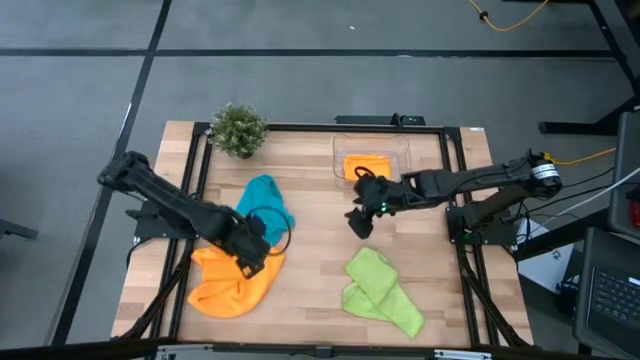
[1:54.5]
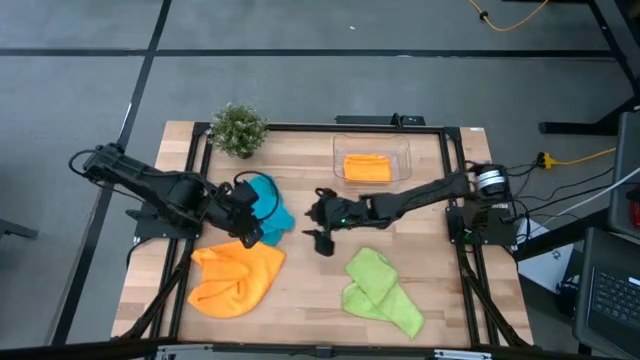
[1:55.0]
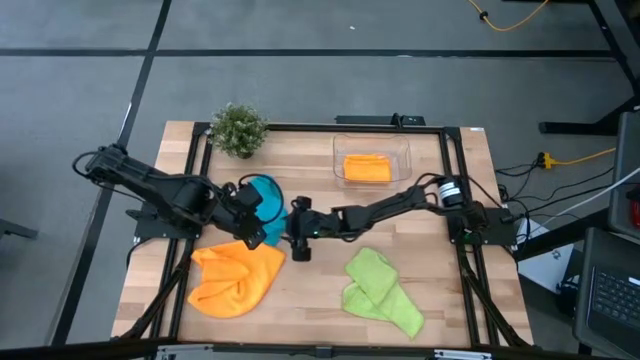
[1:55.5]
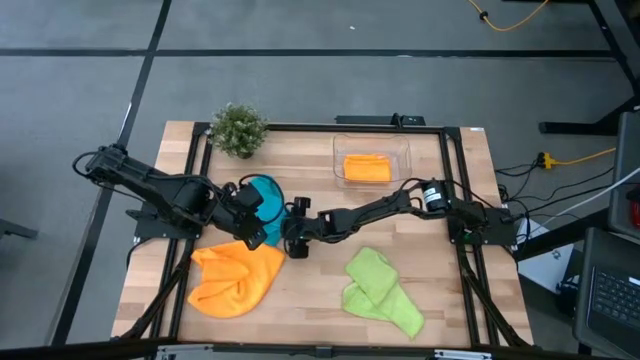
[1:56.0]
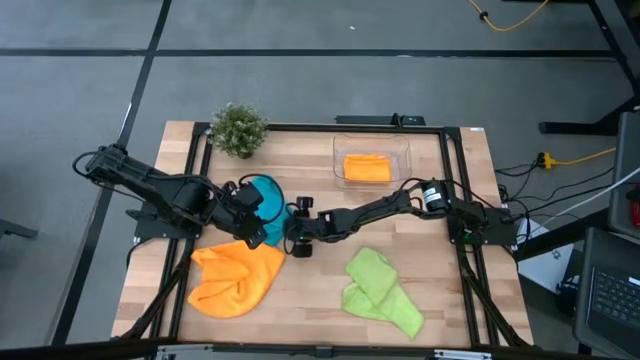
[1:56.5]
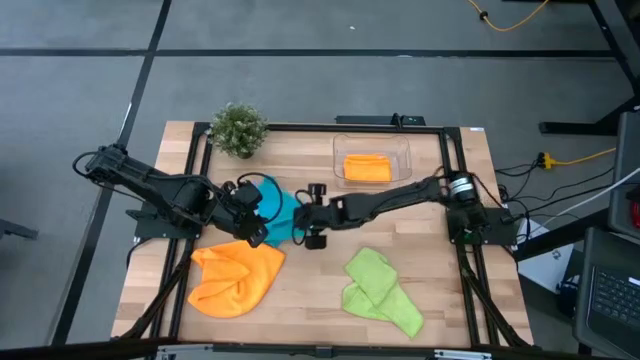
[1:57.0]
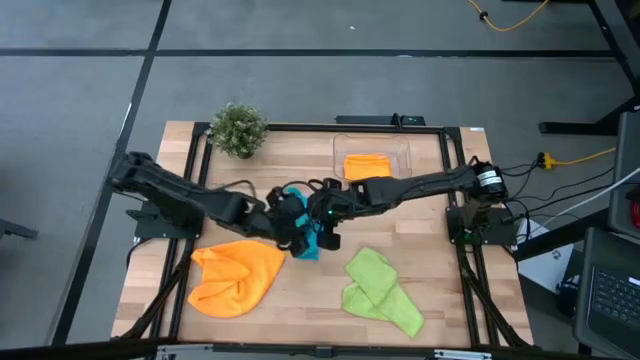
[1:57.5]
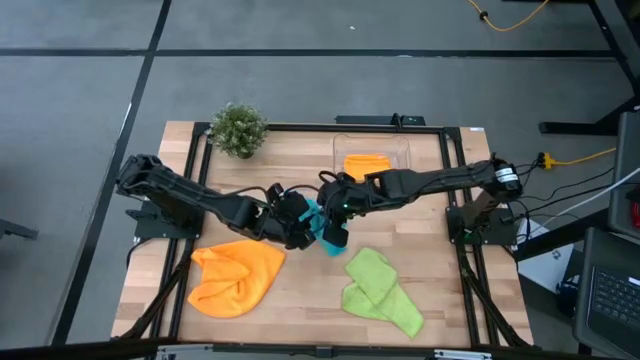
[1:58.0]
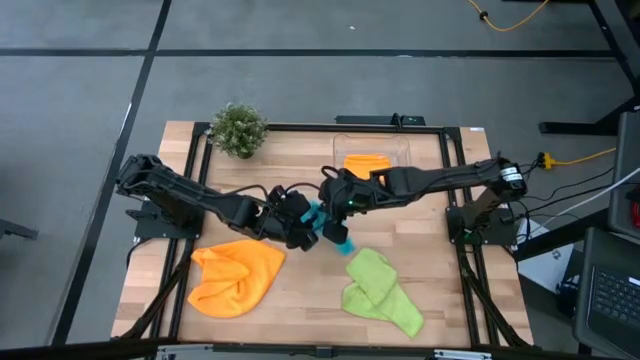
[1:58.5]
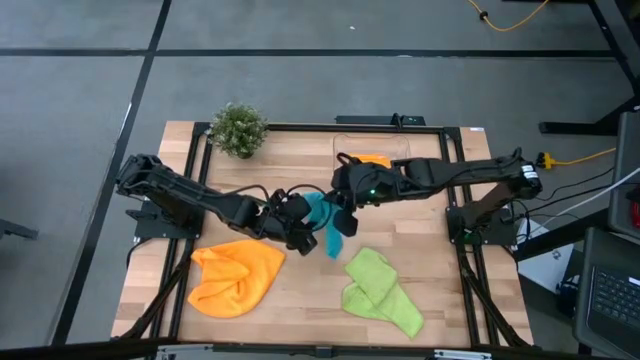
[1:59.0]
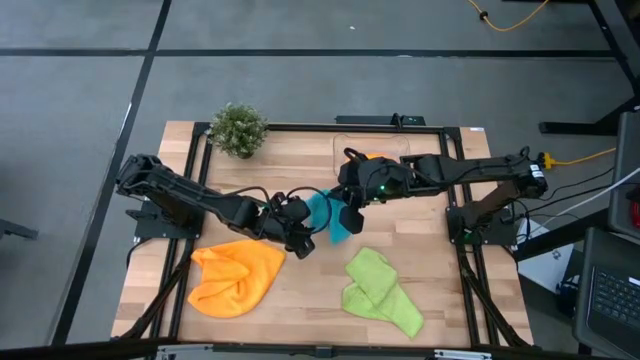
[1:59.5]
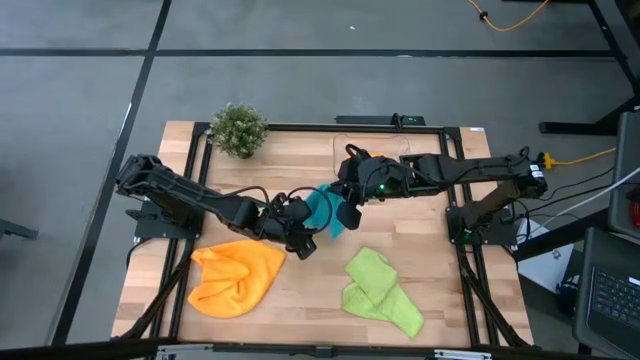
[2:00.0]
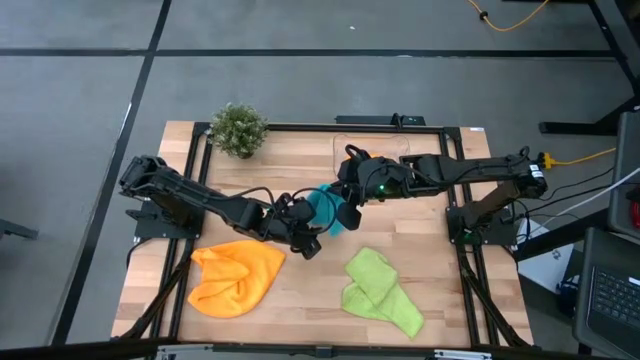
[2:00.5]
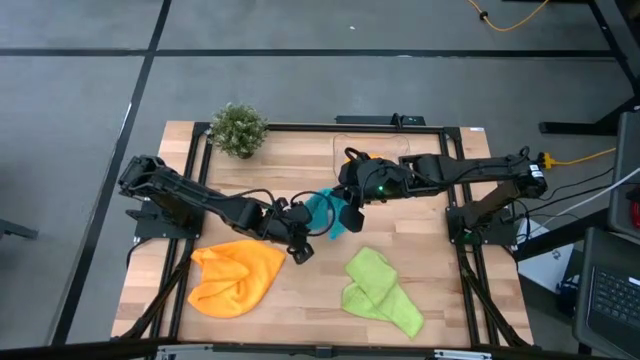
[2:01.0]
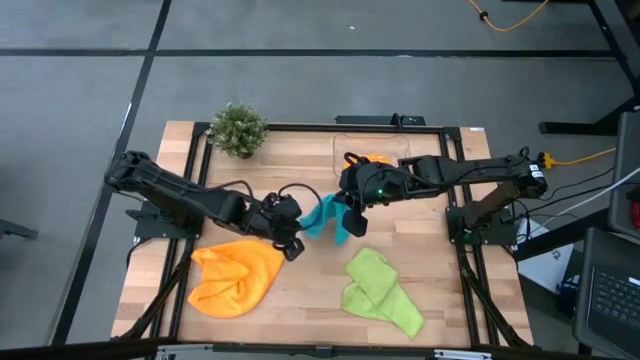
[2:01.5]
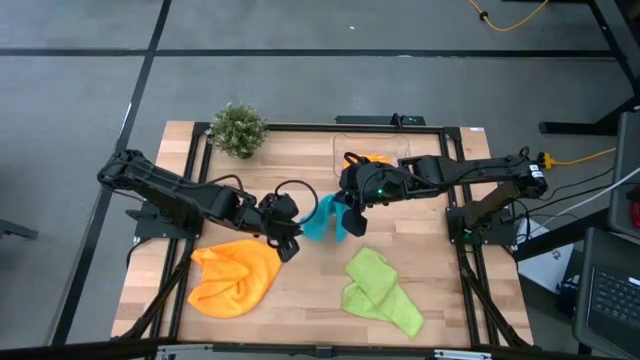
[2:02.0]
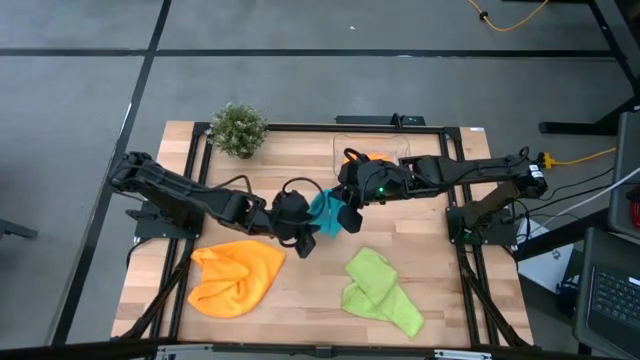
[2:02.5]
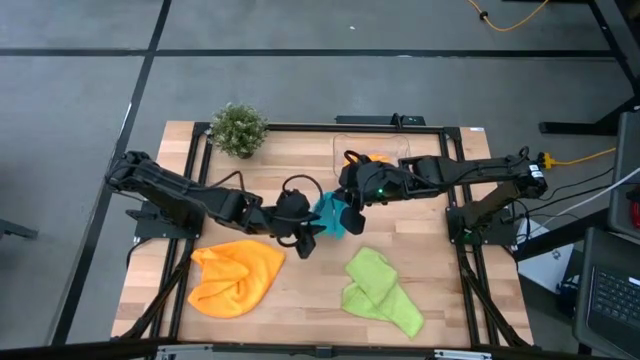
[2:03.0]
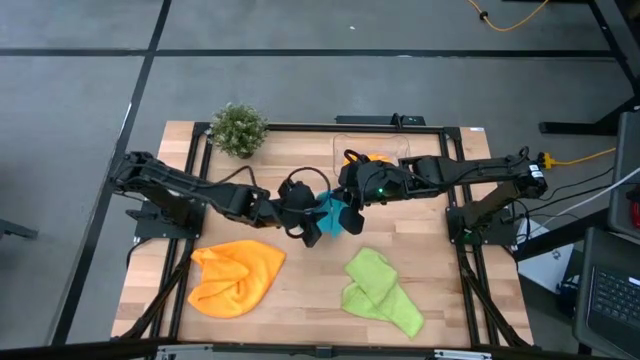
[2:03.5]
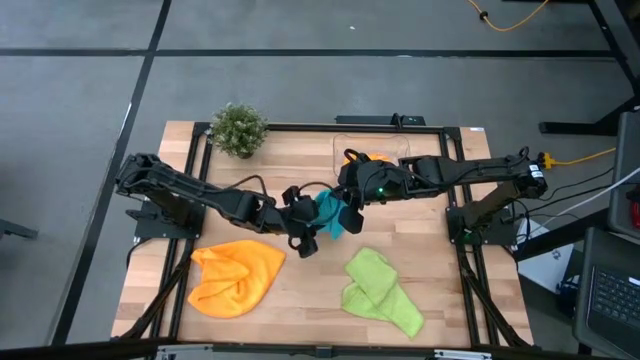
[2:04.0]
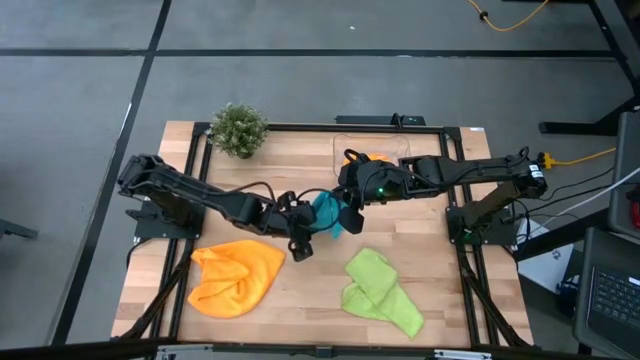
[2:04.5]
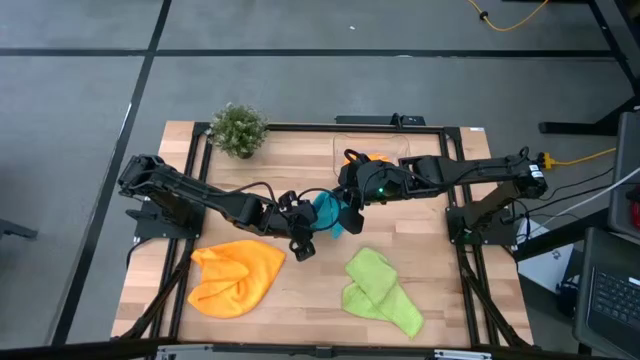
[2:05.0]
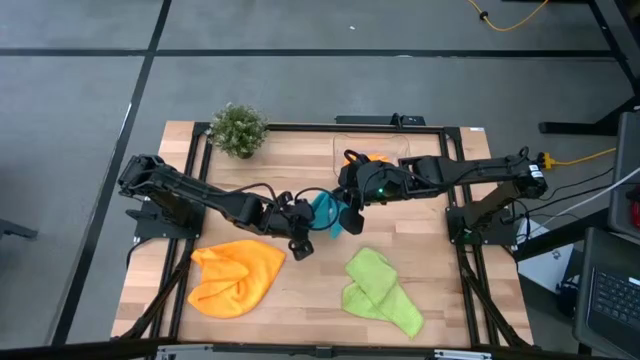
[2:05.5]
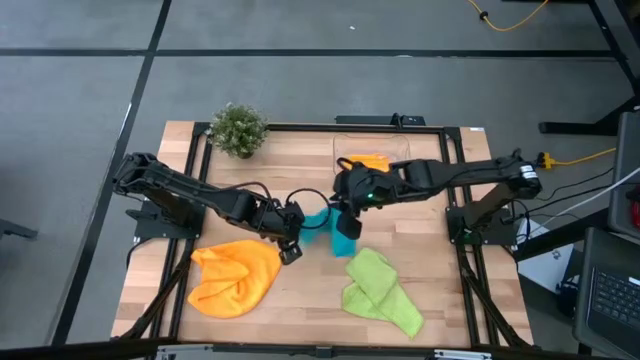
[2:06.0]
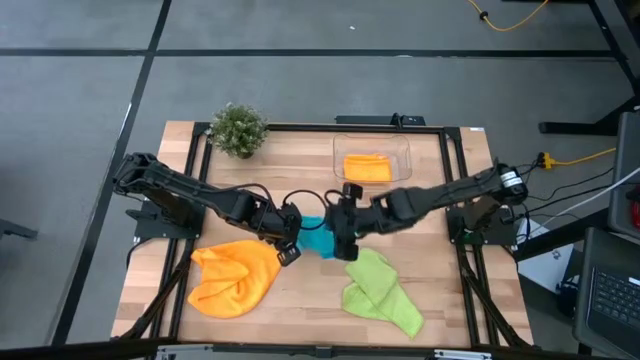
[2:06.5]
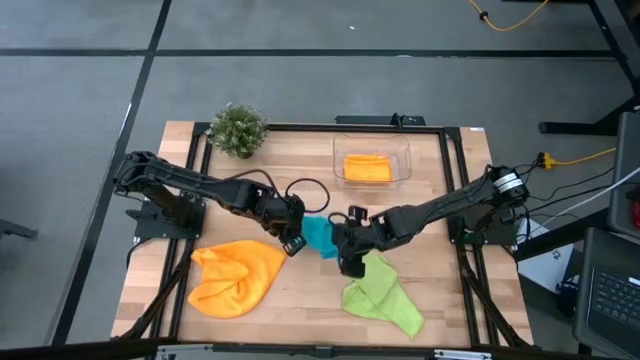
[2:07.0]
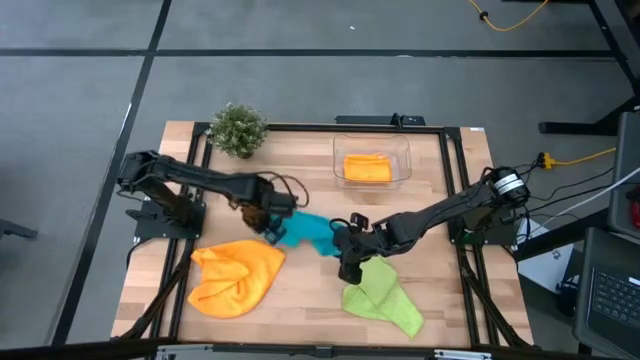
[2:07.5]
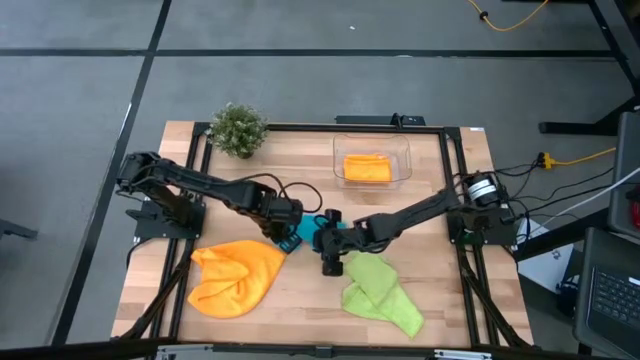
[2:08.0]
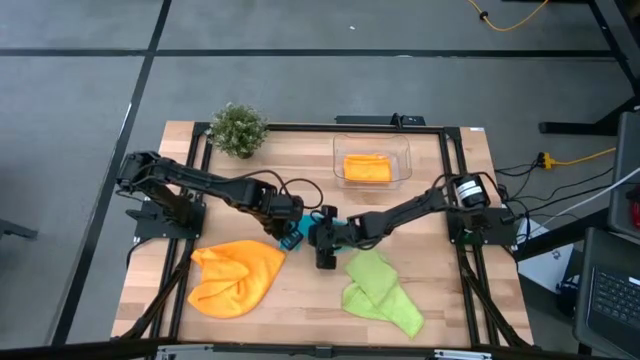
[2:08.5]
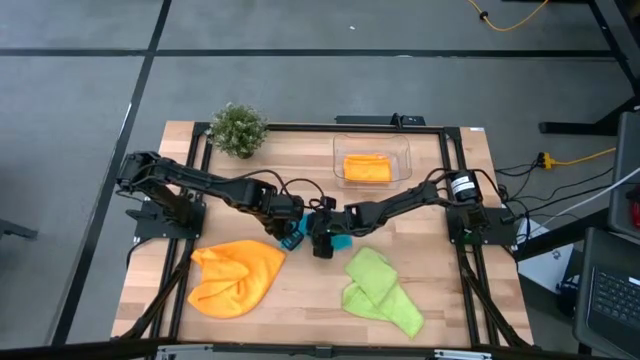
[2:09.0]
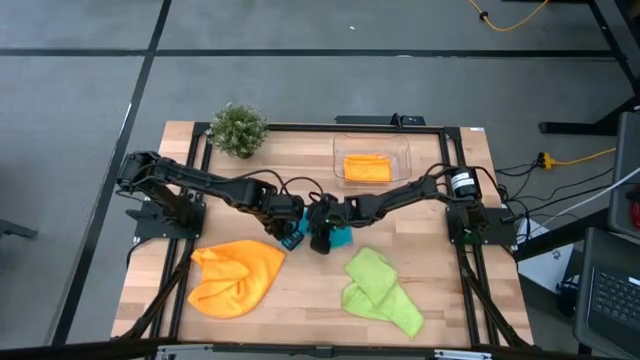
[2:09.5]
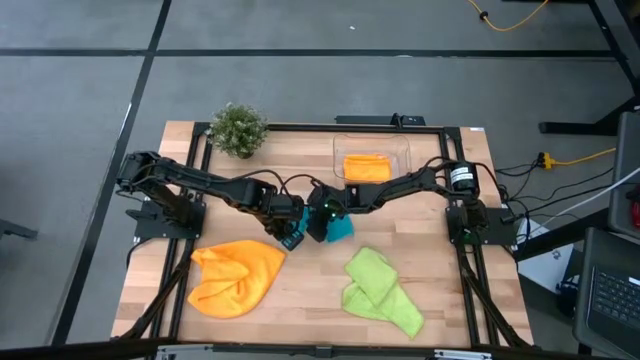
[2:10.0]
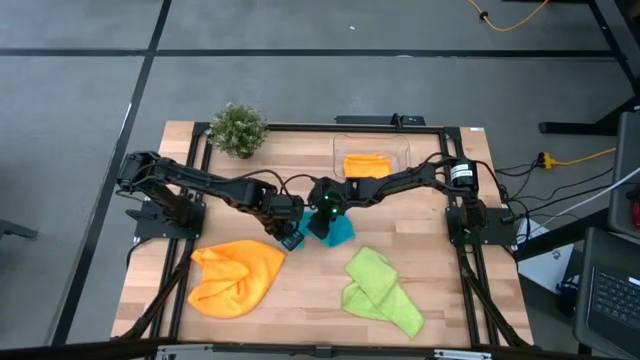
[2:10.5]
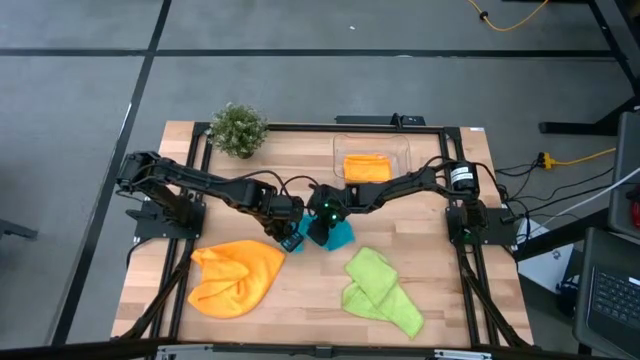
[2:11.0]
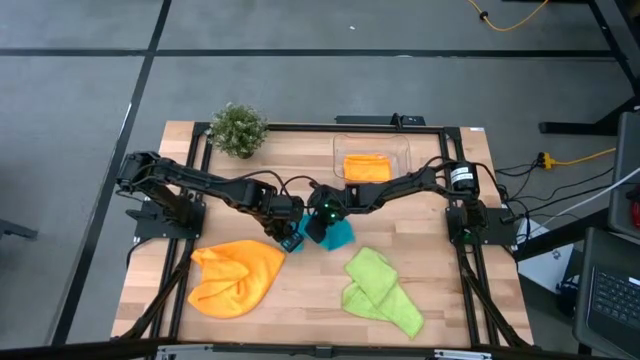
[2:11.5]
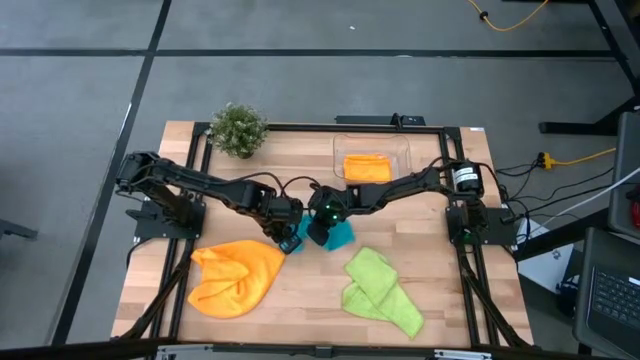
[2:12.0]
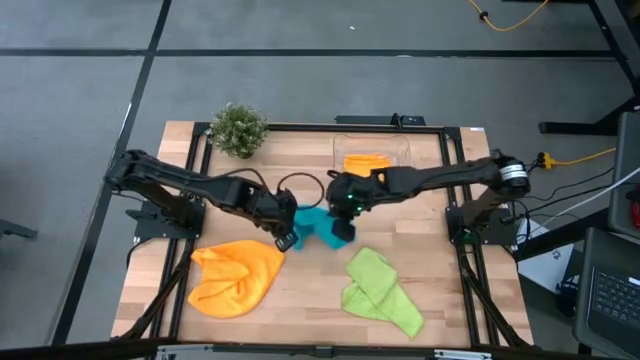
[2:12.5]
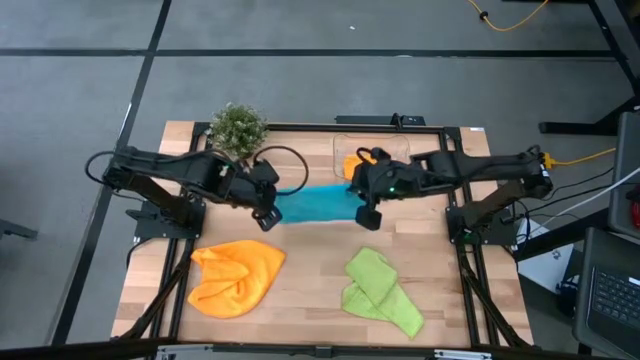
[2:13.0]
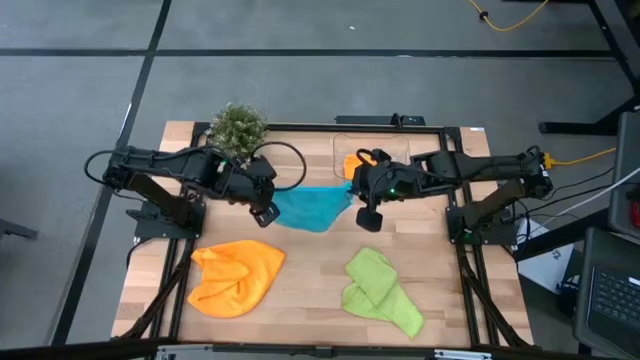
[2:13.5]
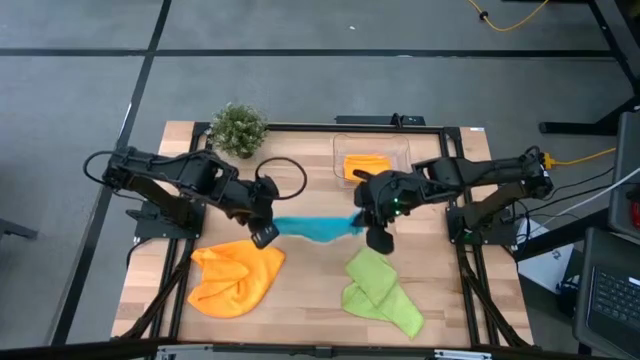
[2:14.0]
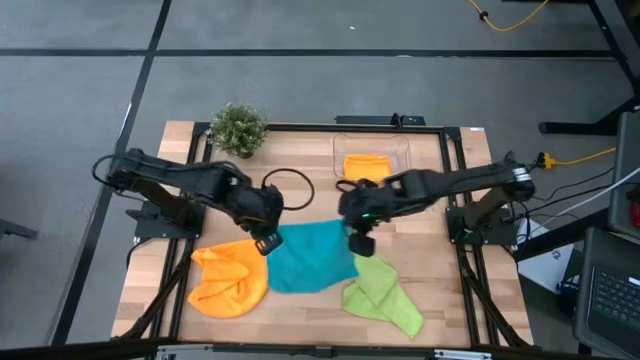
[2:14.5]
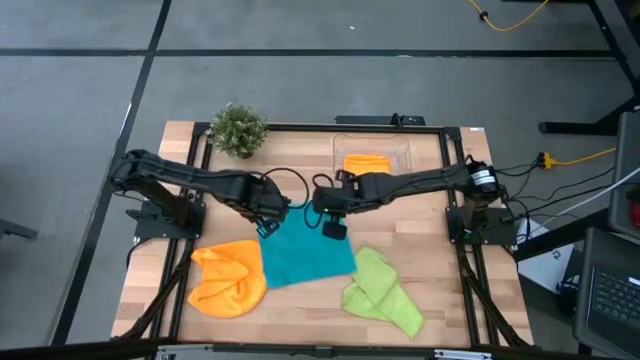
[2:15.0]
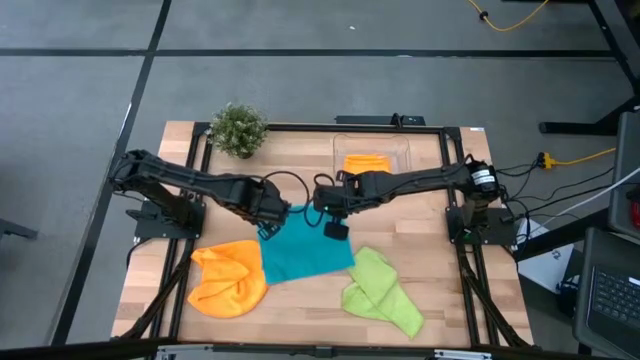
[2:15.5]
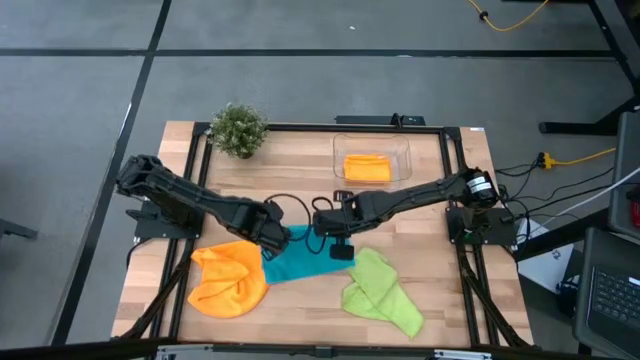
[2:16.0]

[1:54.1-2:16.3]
Task: Fold microfiber towels
Fold the blue microfiber cloth
